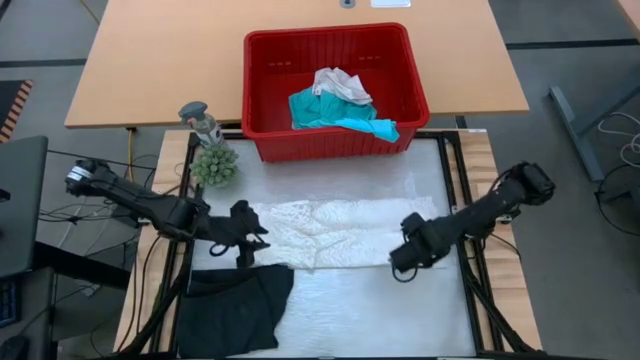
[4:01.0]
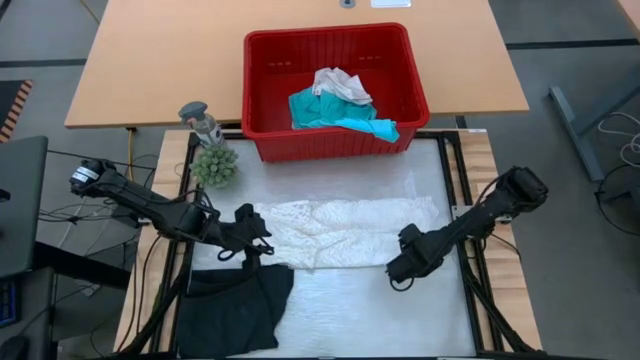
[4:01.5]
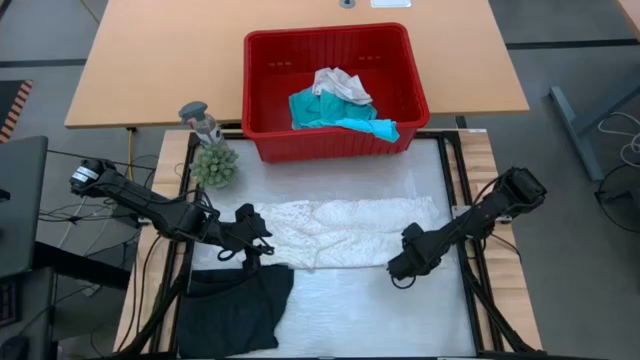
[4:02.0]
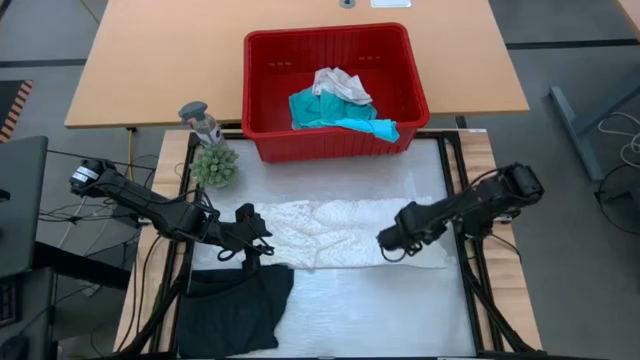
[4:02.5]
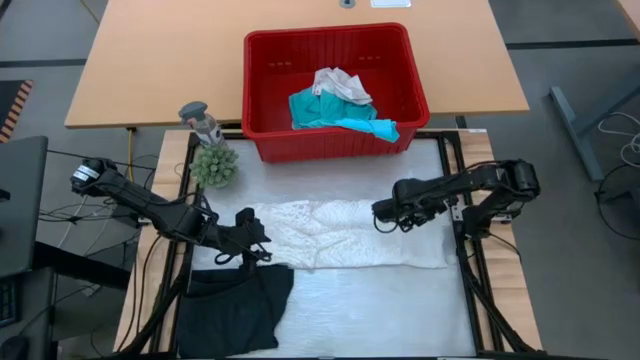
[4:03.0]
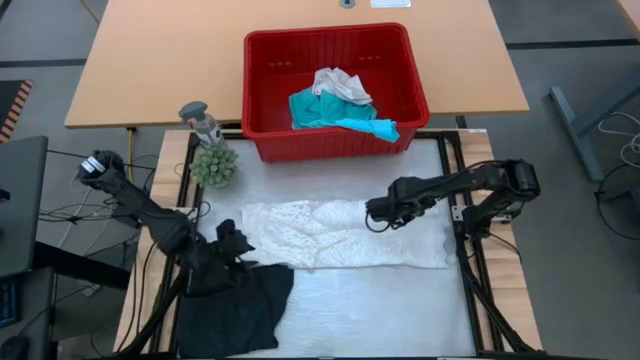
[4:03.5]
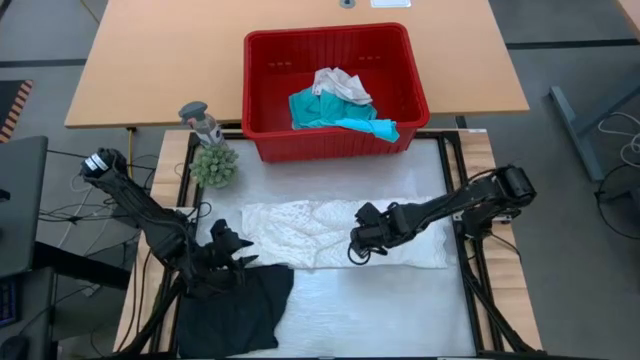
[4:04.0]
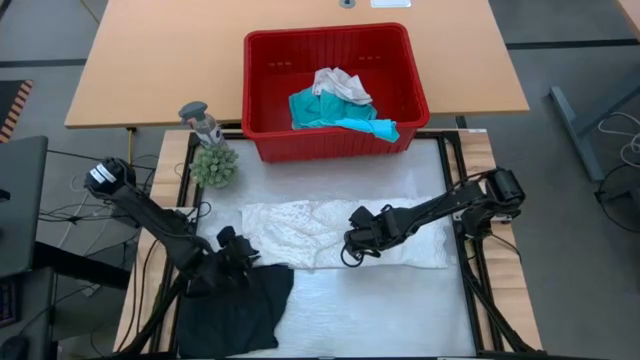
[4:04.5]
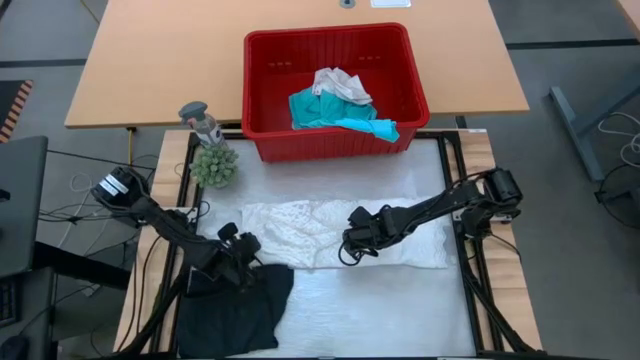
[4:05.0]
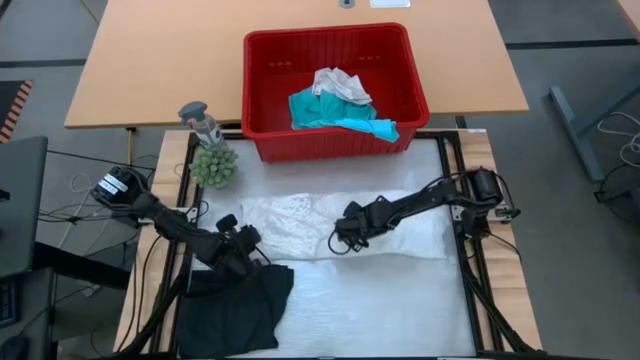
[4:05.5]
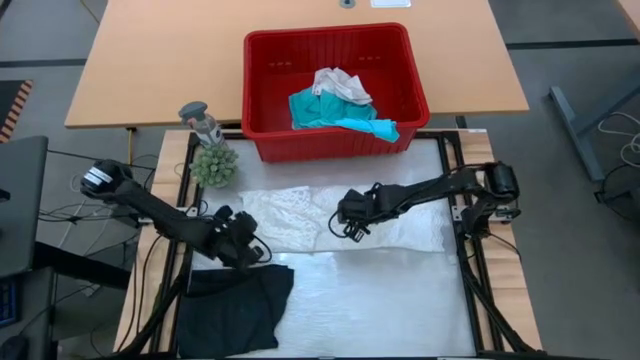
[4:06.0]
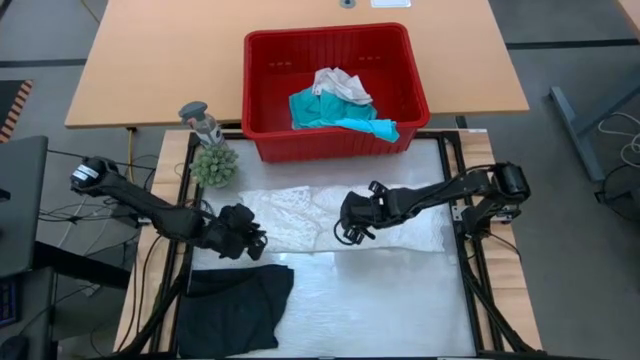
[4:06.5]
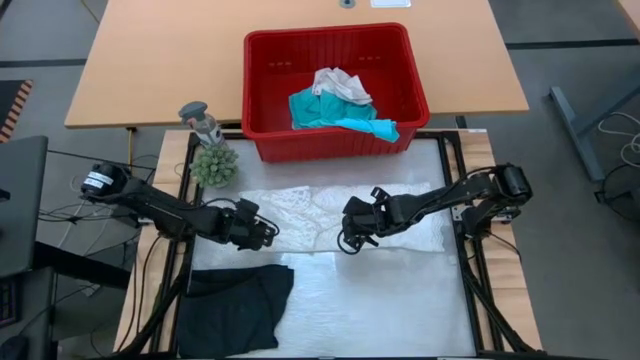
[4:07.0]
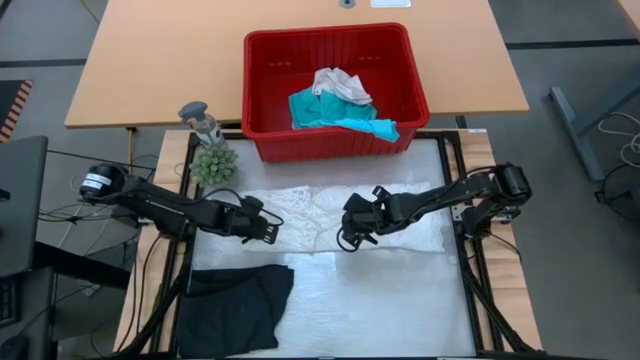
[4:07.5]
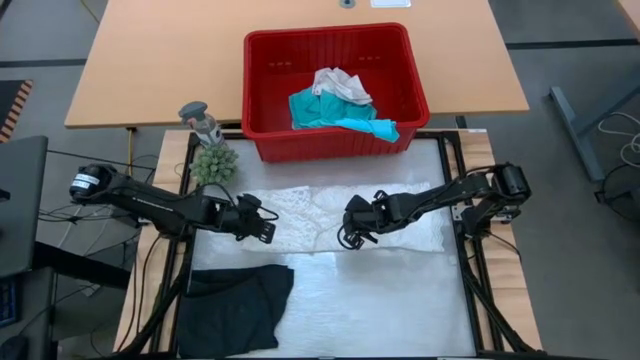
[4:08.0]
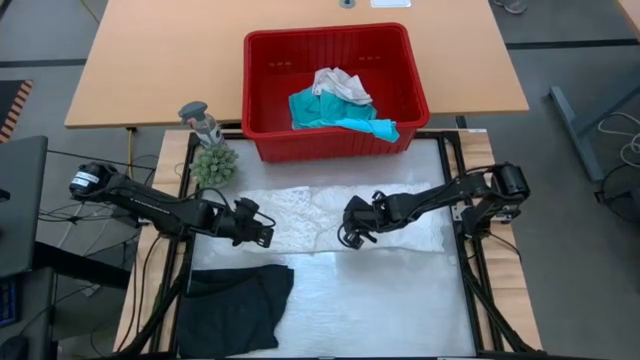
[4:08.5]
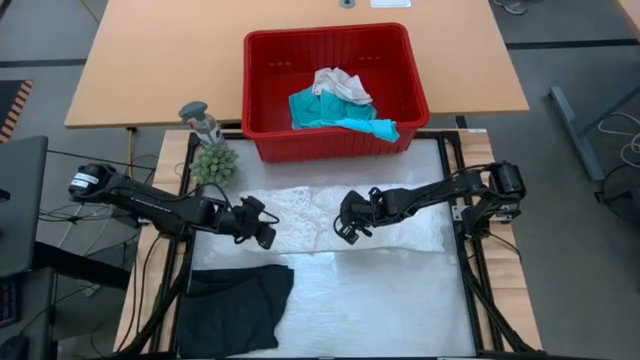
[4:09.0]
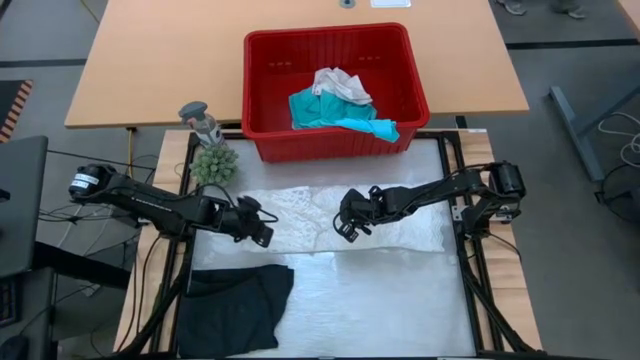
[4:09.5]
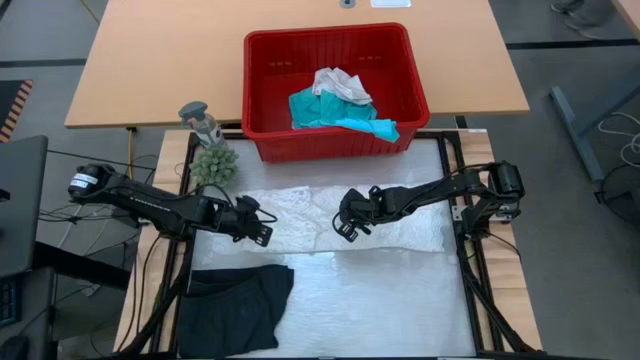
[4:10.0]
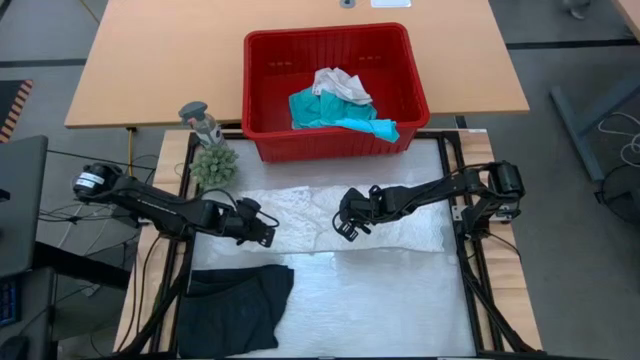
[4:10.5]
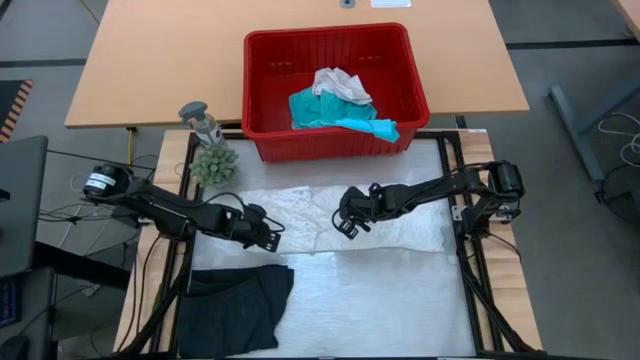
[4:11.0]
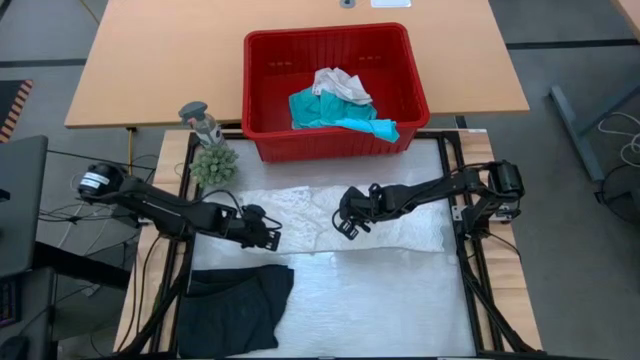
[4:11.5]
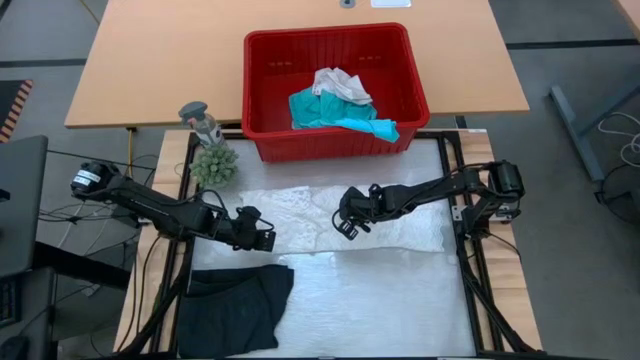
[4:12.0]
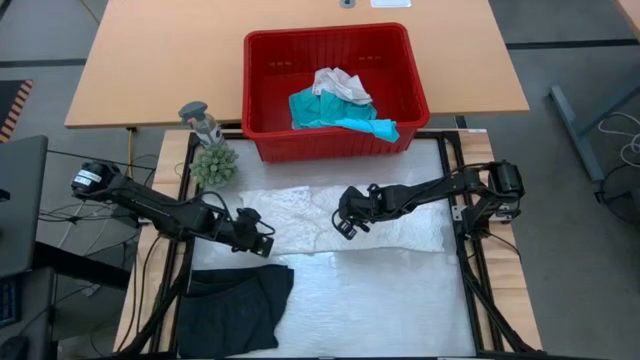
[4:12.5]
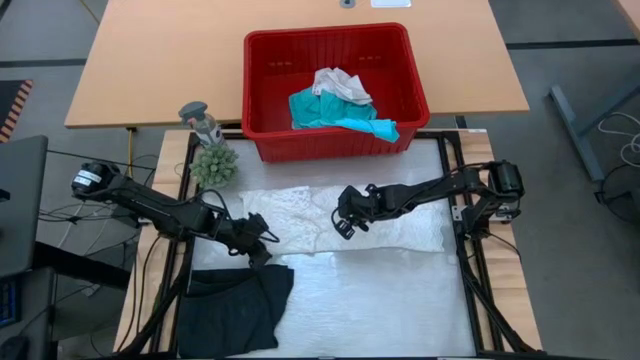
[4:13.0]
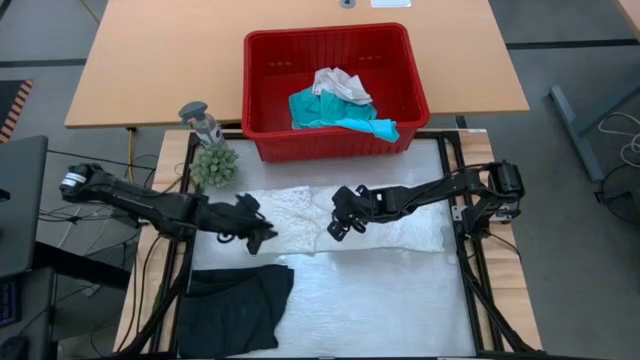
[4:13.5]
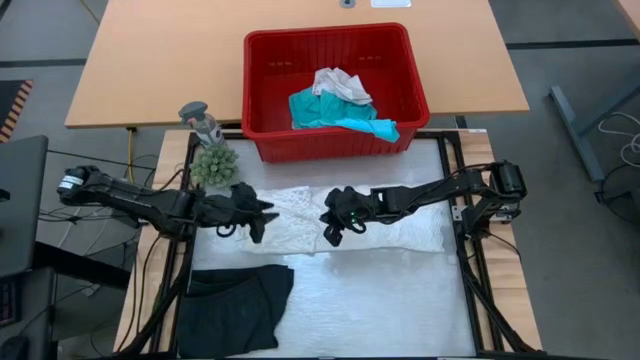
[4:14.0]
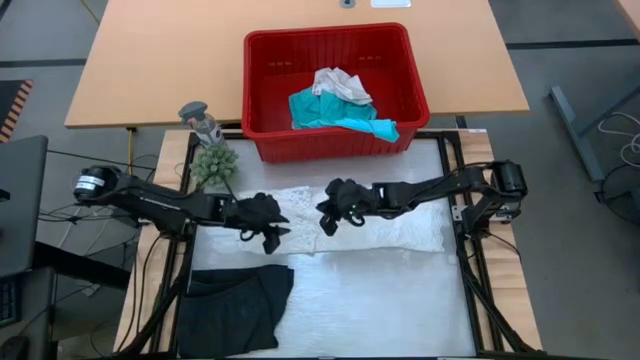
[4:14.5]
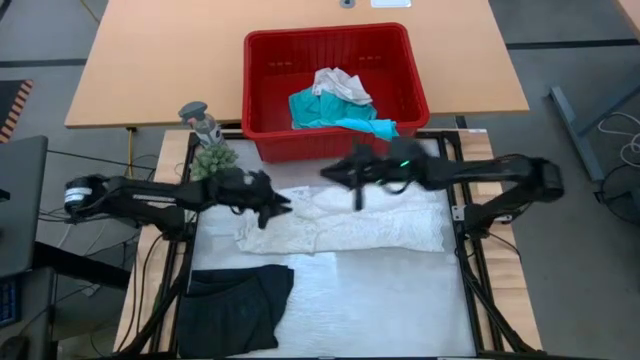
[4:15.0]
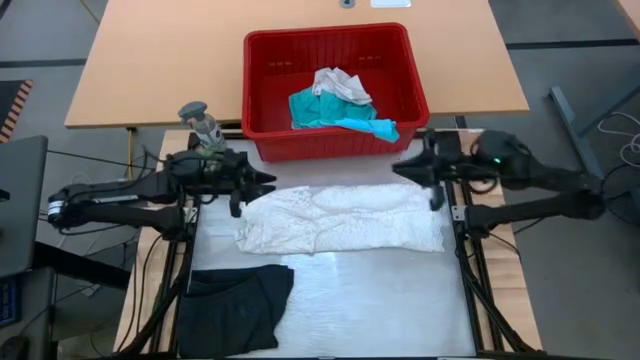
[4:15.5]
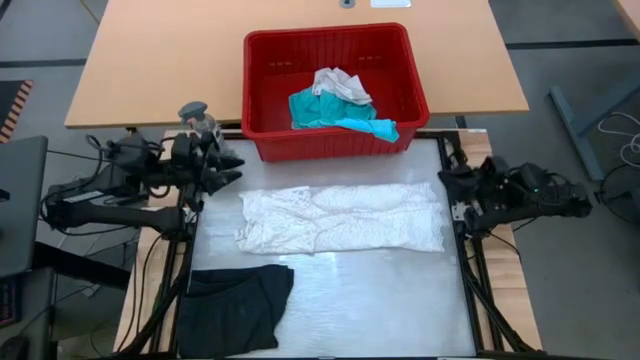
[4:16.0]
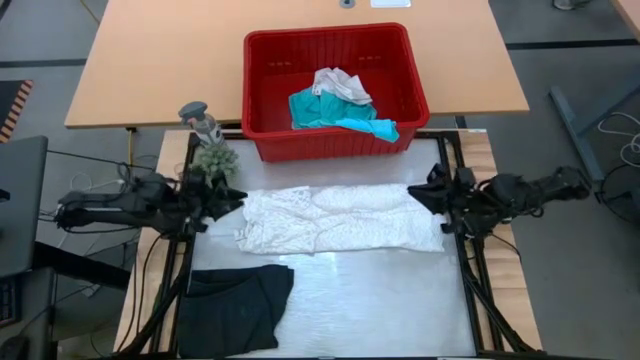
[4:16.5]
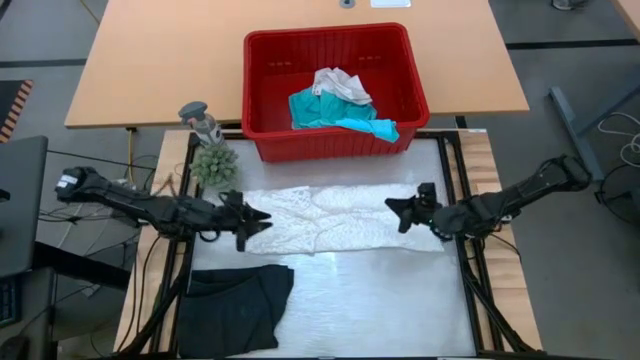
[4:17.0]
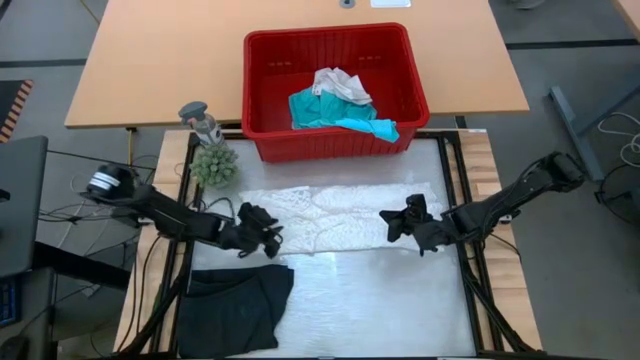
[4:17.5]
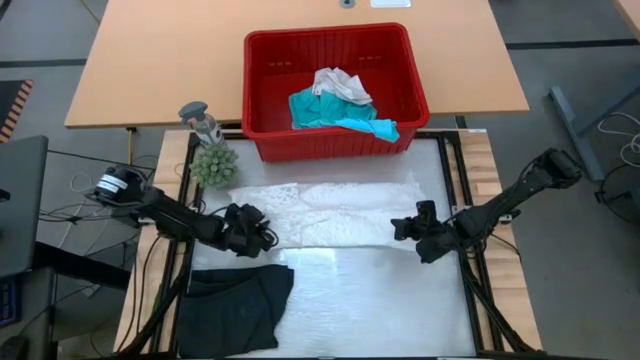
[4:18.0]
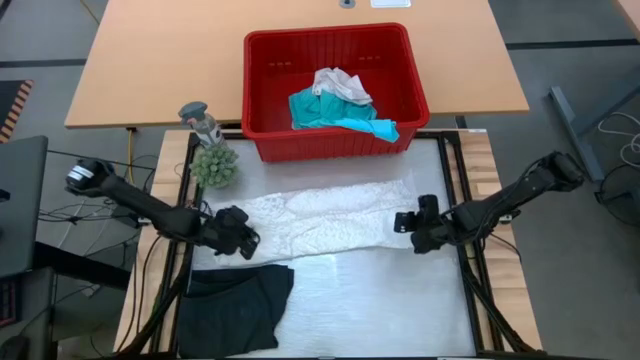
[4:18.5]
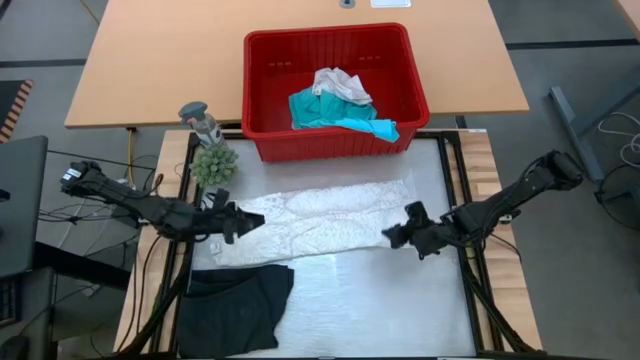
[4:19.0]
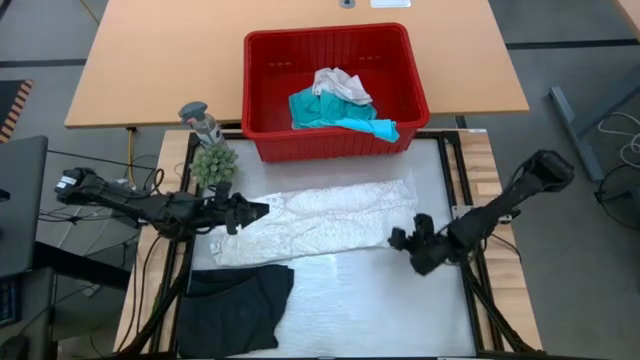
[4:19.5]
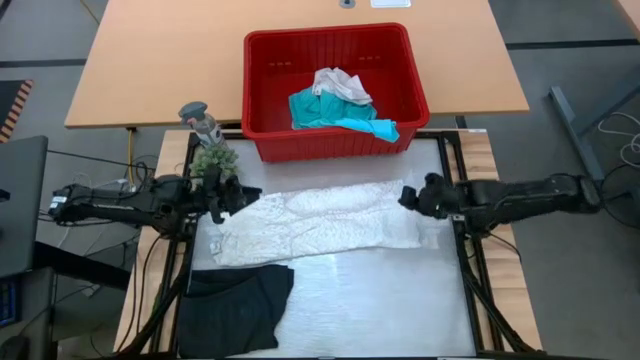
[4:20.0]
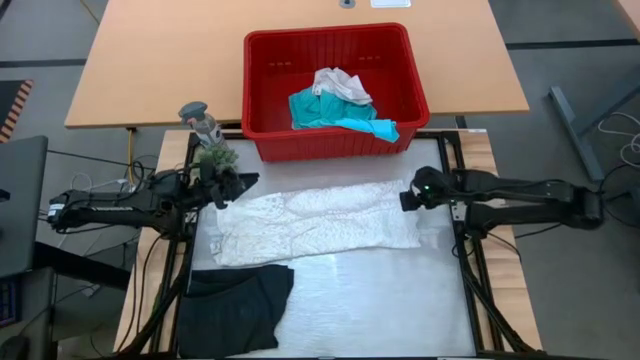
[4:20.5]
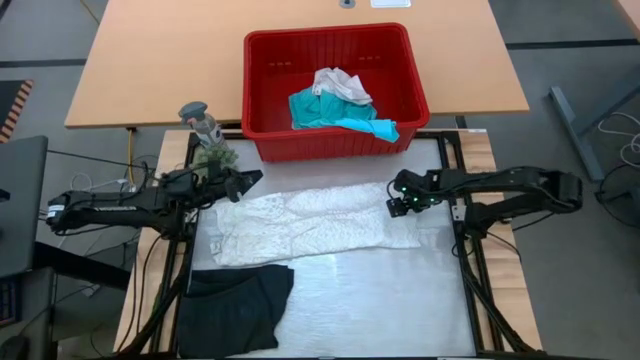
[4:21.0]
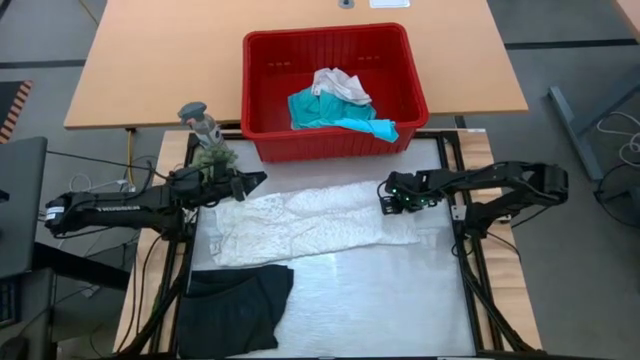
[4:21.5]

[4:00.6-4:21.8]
Task: Fold Laundry from Bin
Fold the white dress
